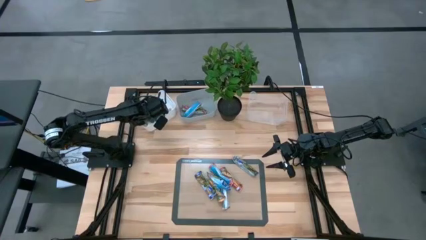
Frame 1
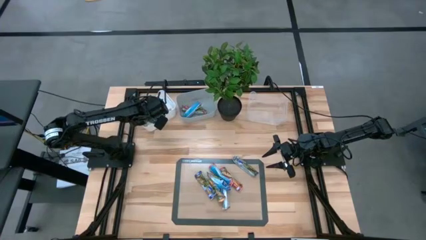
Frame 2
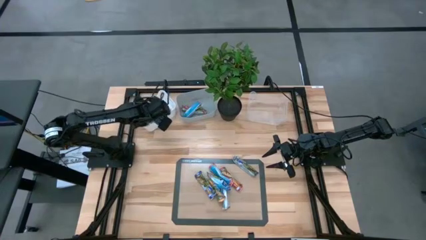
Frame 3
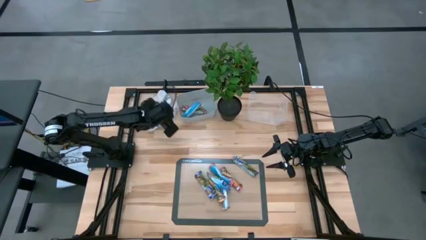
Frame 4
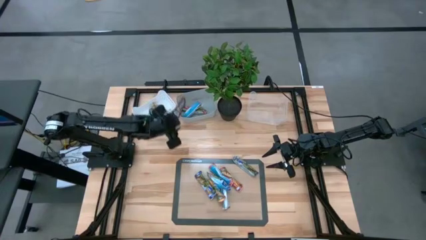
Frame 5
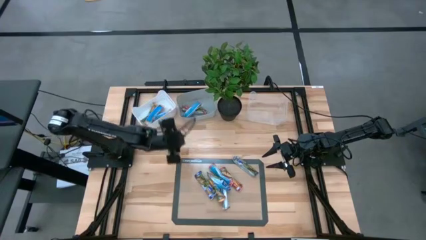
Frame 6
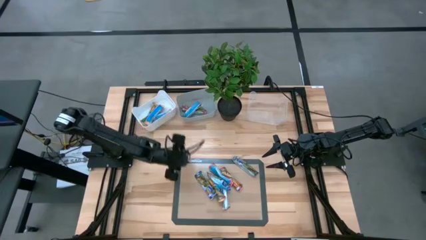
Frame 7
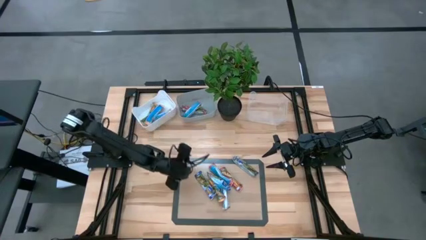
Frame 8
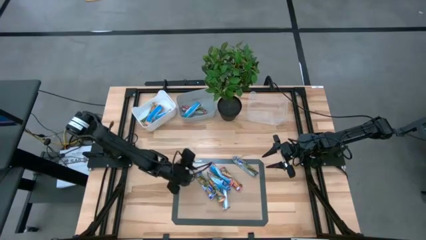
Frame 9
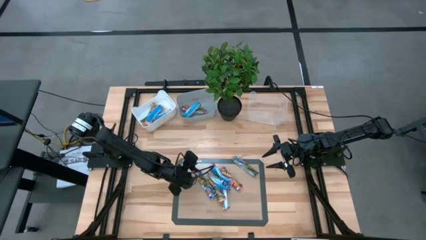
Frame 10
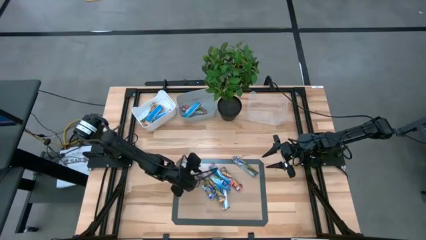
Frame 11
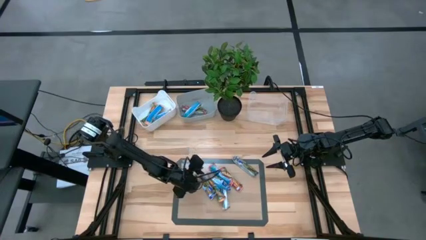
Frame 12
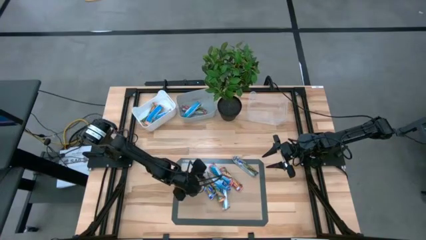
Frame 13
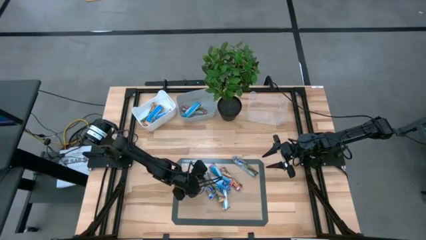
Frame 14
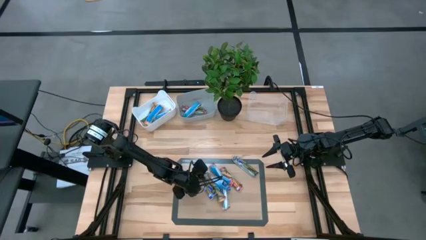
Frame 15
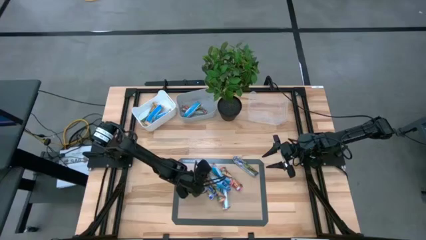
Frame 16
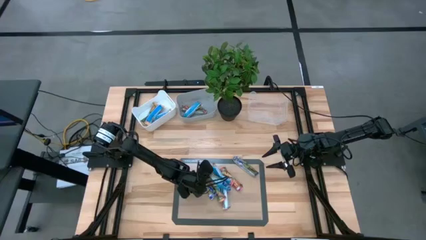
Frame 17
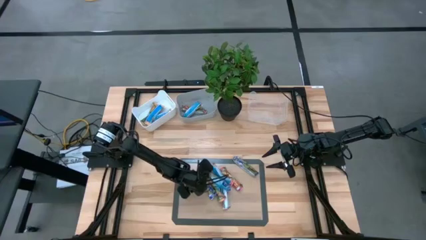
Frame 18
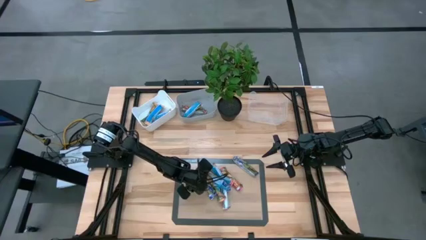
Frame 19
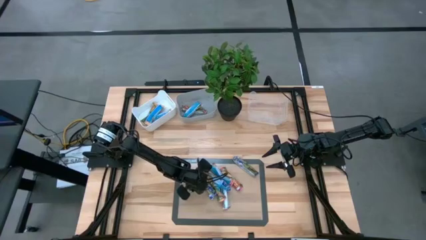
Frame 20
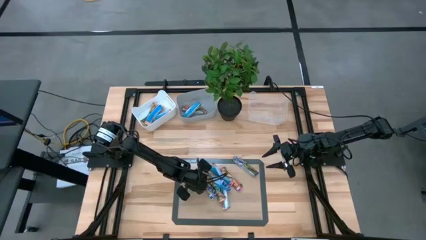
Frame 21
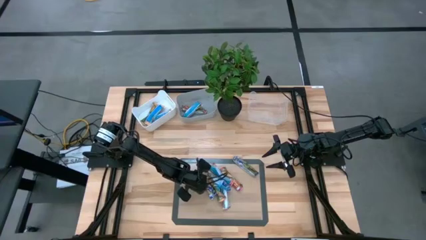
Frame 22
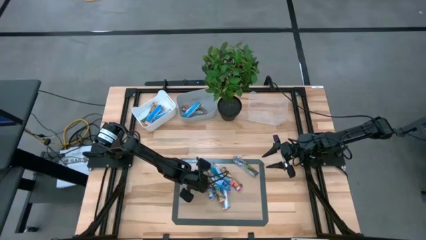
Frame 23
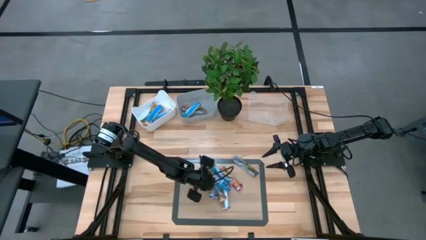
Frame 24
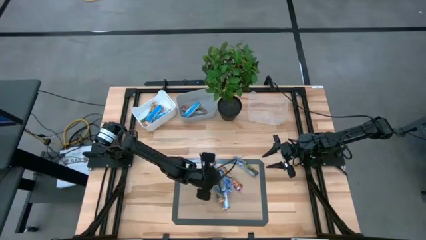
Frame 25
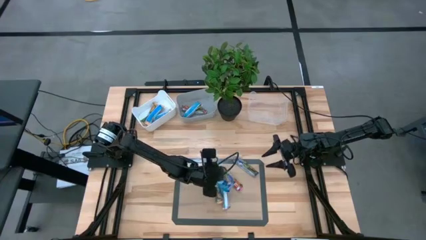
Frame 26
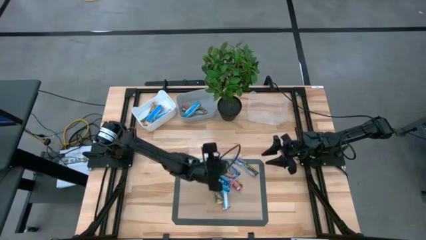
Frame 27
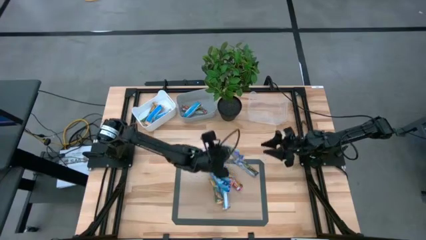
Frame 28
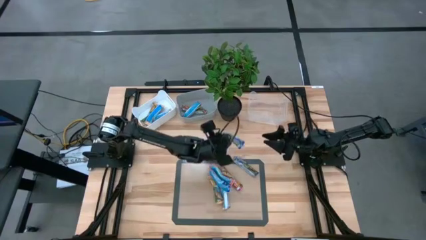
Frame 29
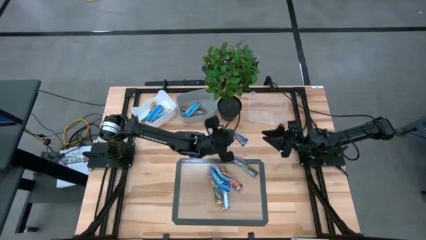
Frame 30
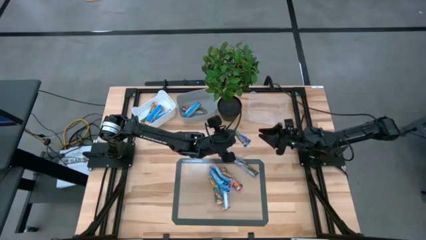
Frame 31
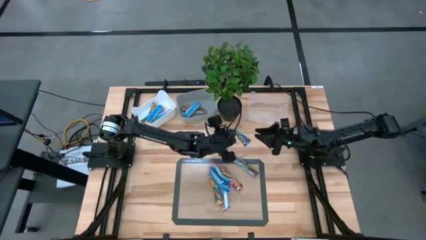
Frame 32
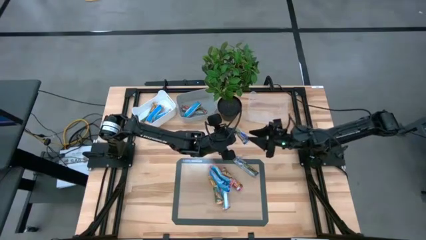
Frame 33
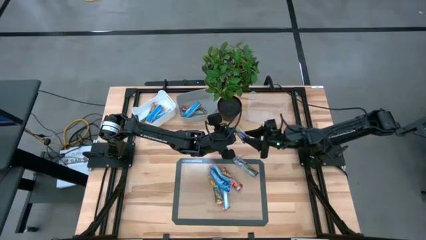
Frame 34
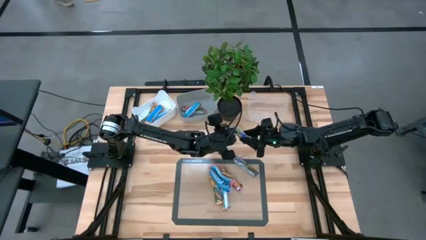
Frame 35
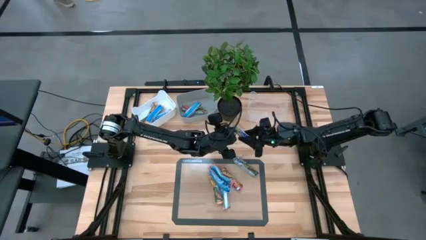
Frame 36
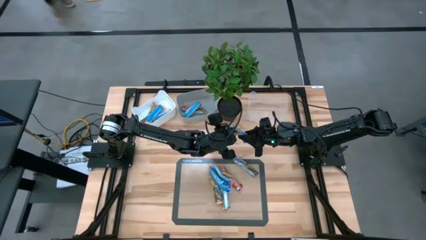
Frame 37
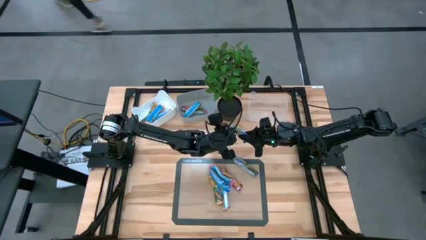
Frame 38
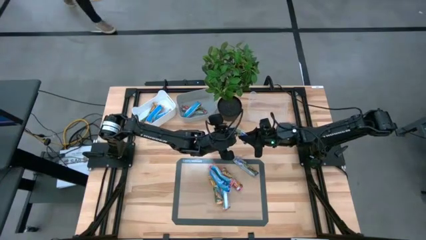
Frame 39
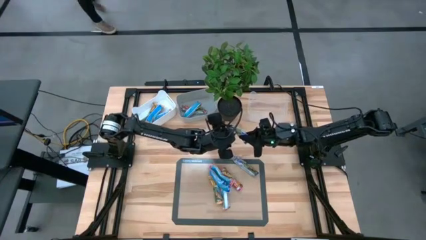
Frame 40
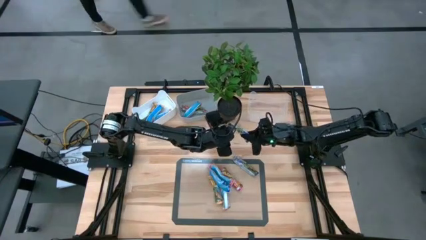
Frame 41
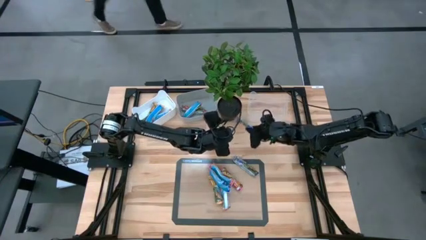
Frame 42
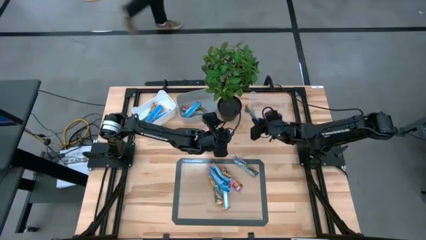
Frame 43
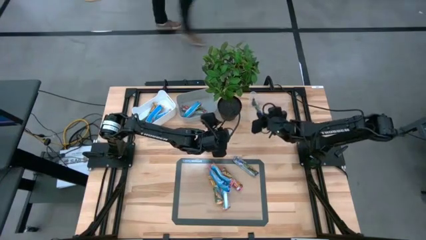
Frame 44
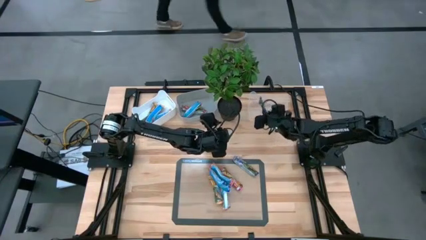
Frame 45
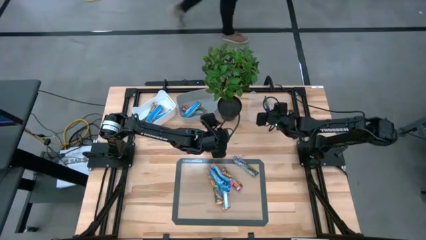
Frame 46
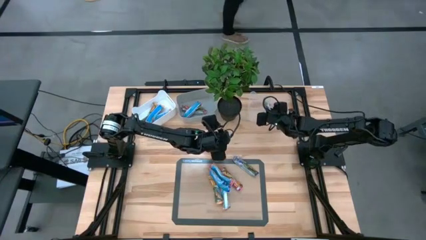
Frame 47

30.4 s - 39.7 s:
Task: Pick and place Granola Bars by type
Put the blue granola bar into the transparent bin

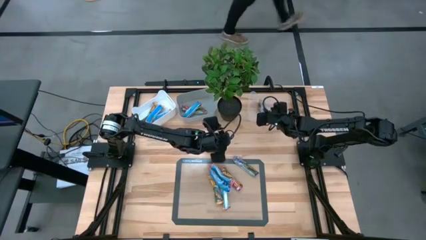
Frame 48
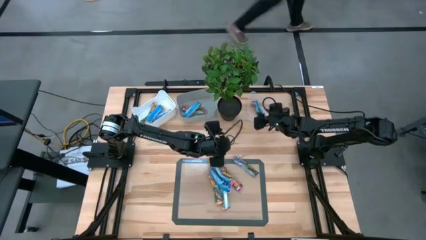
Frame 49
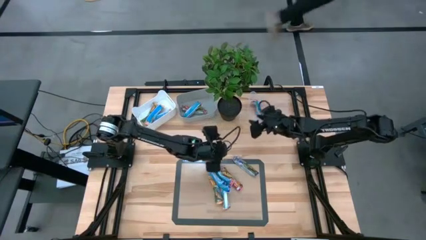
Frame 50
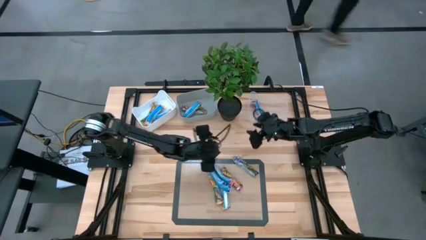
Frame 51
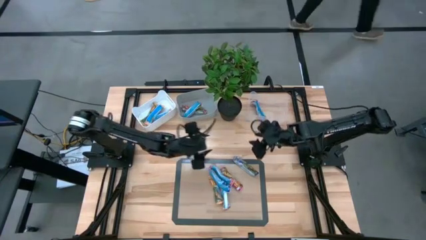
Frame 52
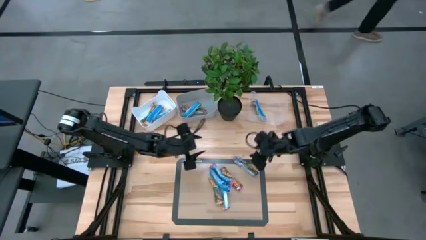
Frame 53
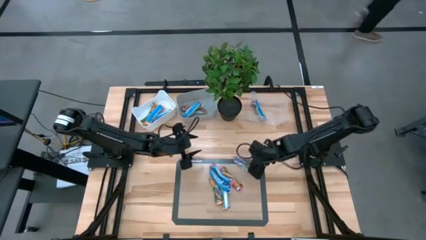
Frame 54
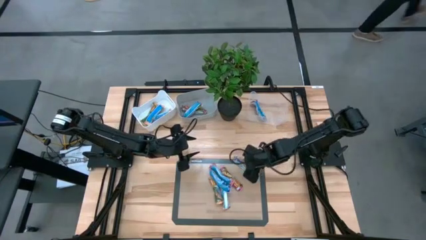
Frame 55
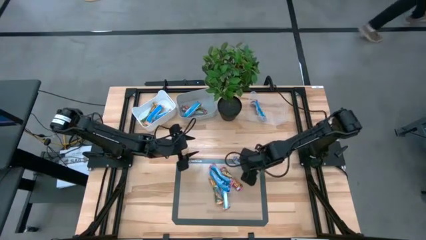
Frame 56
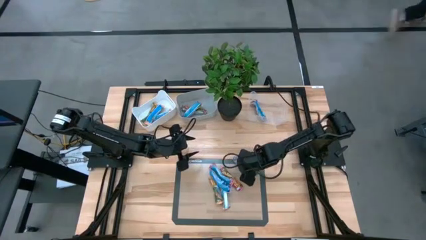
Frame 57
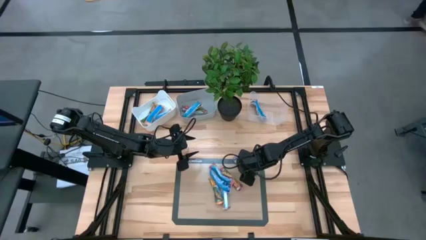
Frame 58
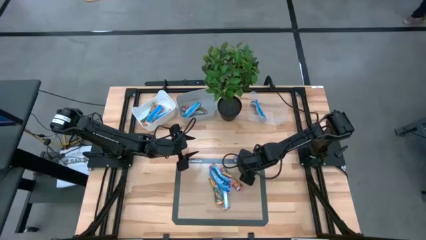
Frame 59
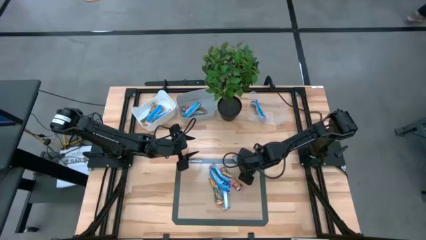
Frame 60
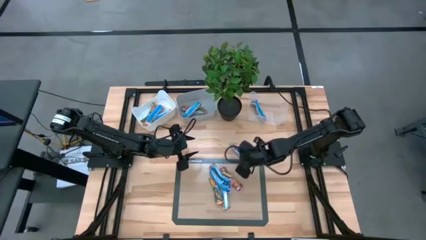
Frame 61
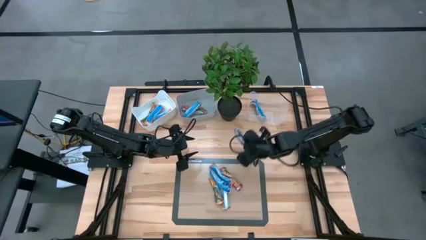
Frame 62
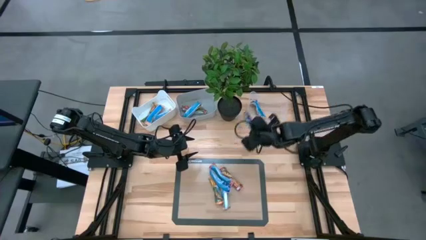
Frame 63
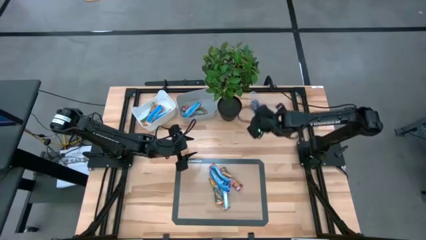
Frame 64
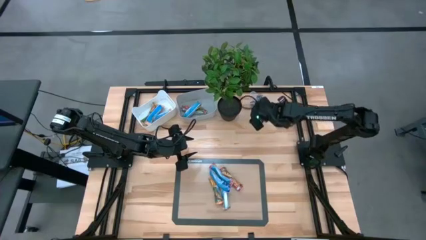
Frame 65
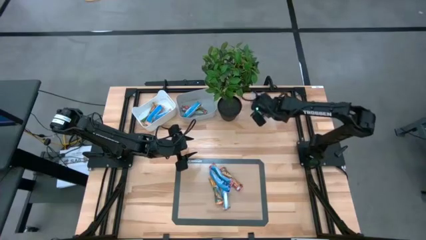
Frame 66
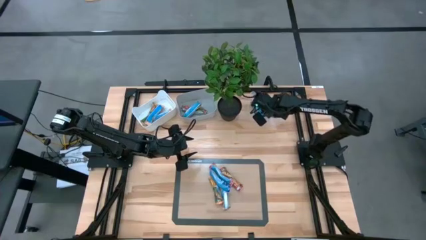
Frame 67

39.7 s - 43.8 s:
Put the blue granola bar into the transparent bin

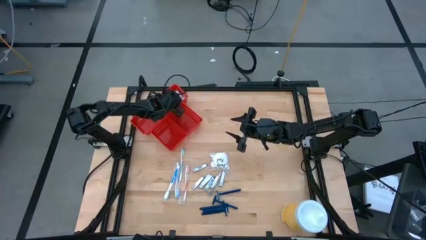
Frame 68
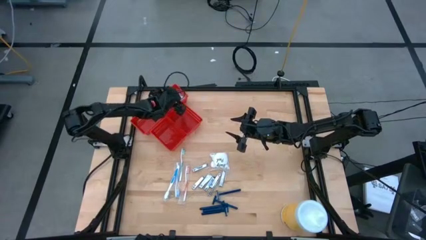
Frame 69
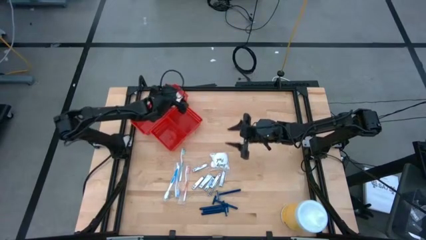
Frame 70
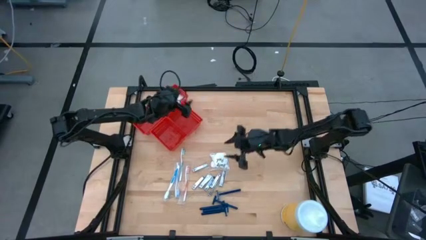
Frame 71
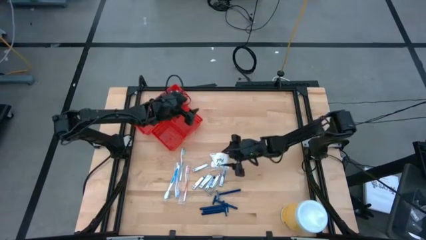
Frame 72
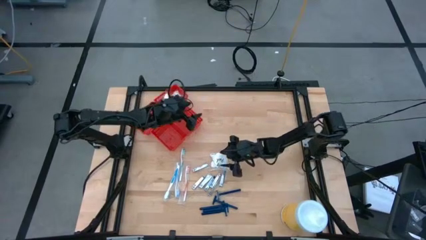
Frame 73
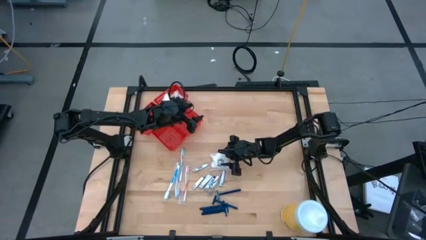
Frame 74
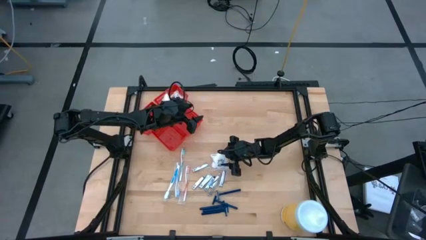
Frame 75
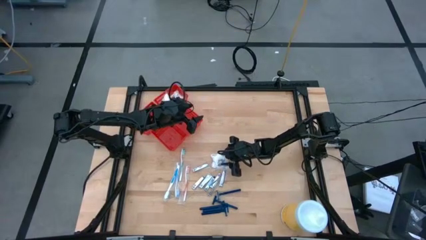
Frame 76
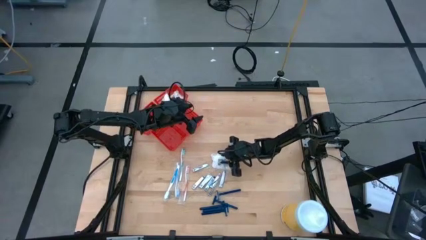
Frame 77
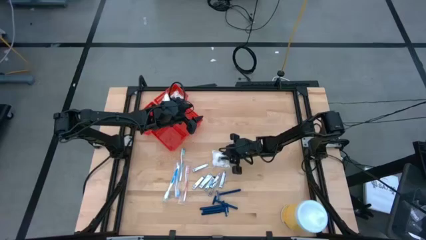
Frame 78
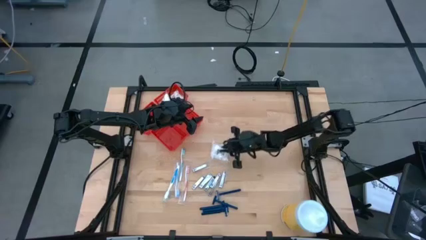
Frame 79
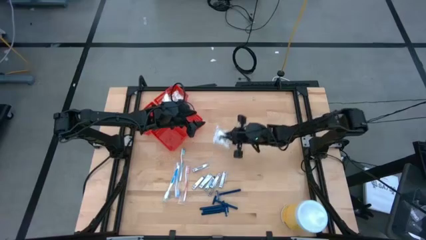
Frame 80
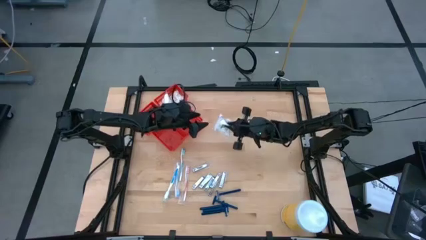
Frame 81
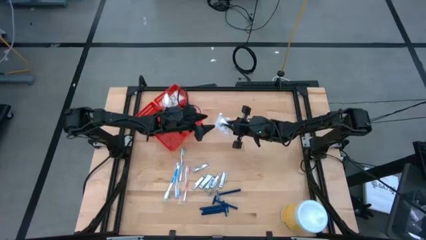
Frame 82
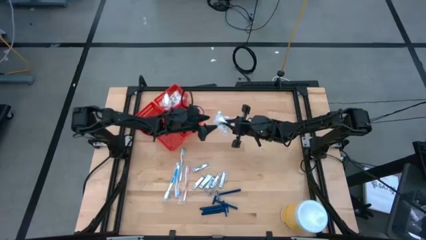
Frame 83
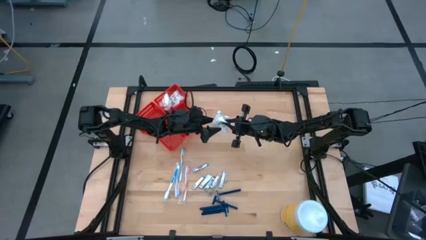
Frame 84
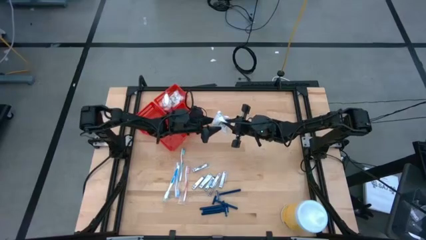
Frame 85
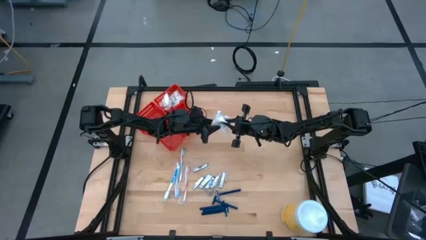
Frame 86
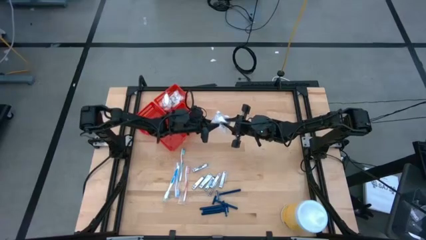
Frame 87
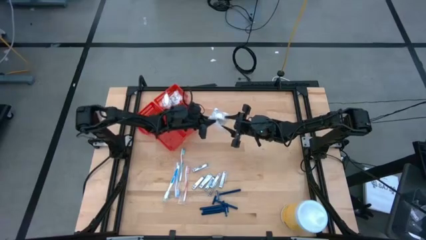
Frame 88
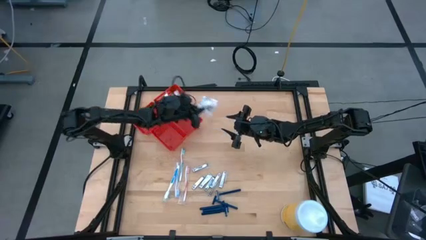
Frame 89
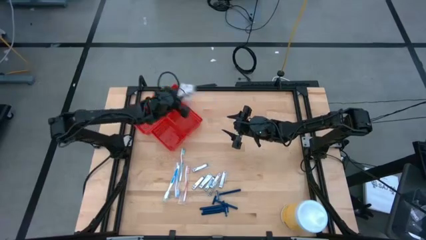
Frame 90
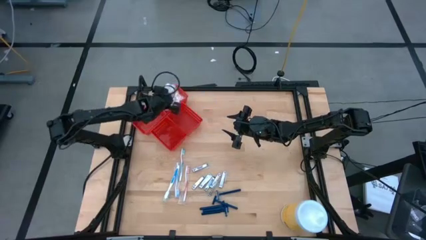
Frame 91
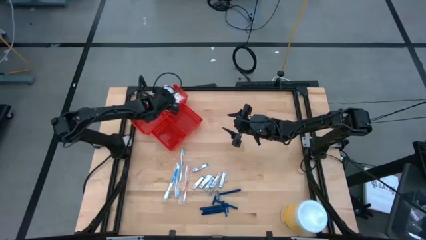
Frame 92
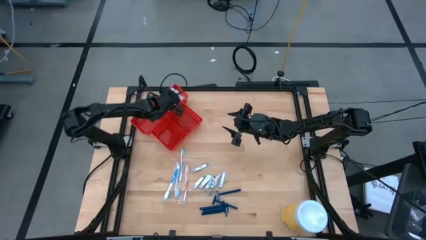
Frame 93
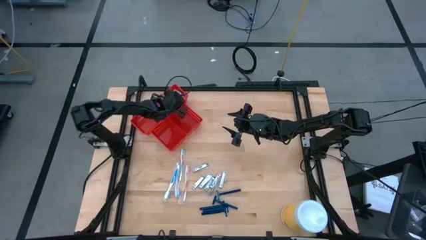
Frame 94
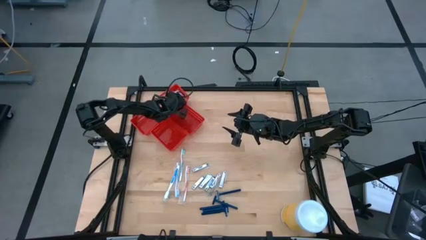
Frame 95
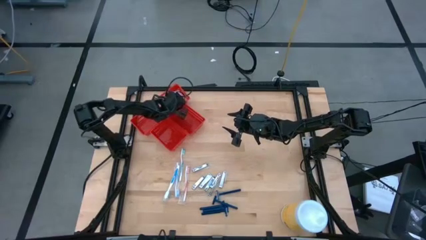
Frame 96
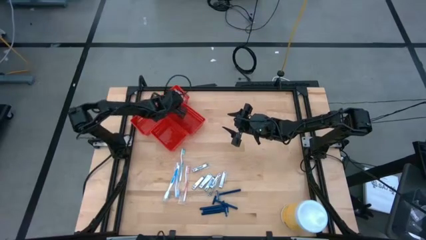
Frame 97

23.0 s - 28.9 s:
Task: Pick & Place Travel size toiletries
Put the vanity pack into the horizontal right red bin
